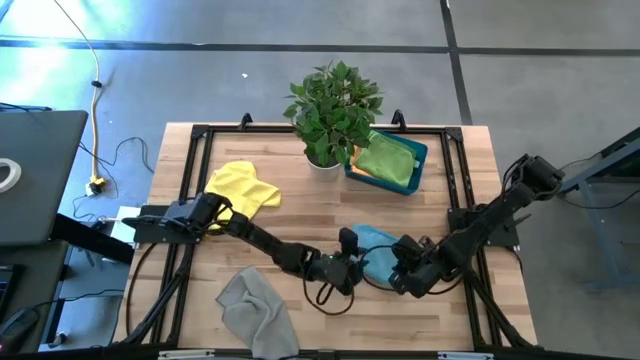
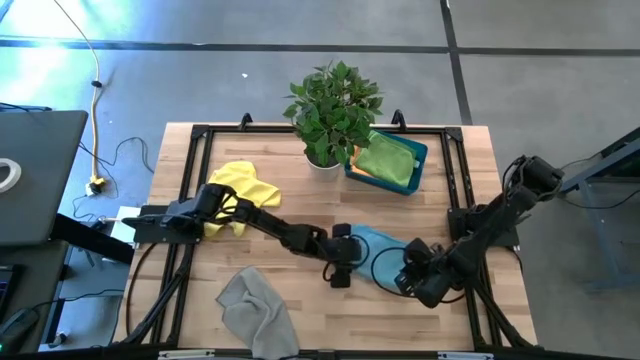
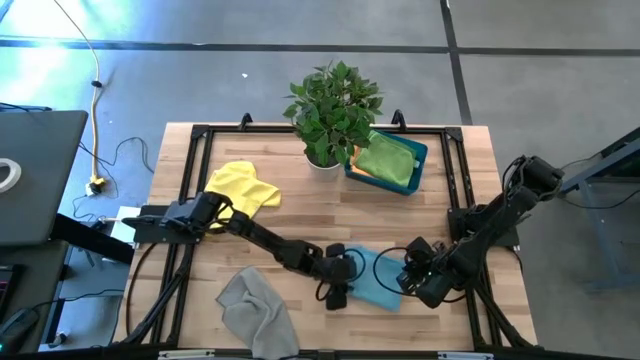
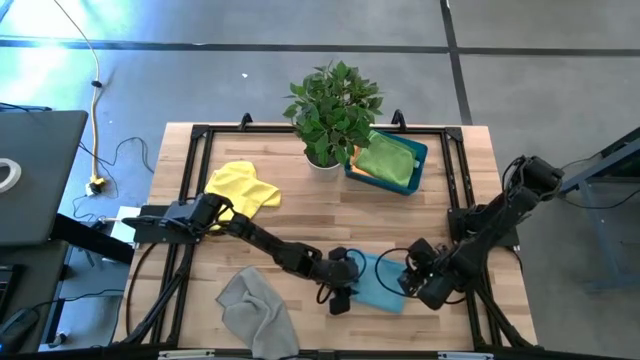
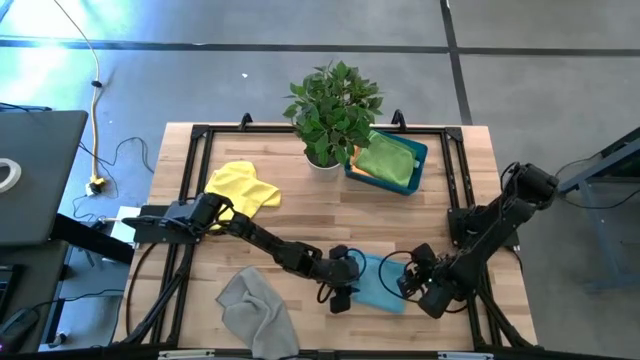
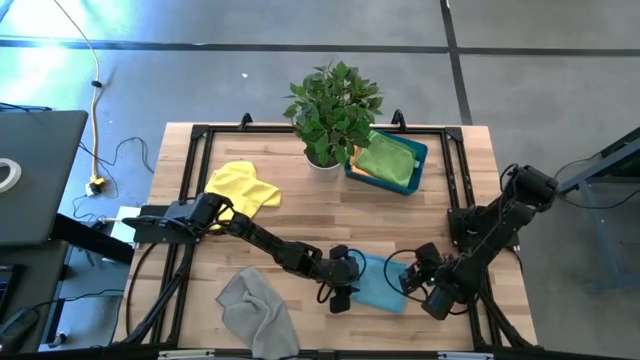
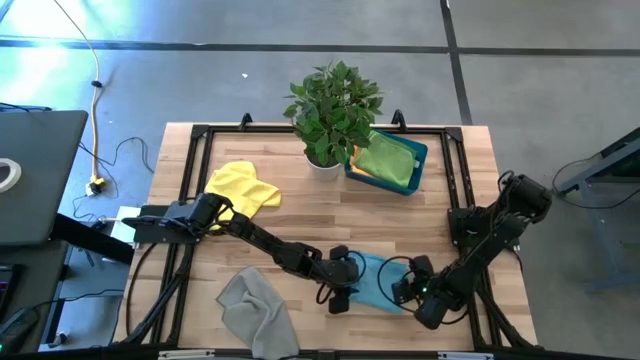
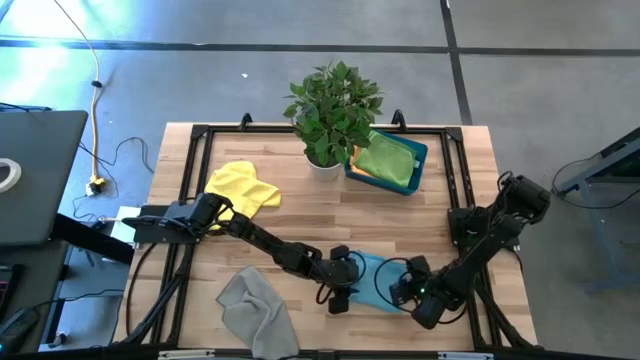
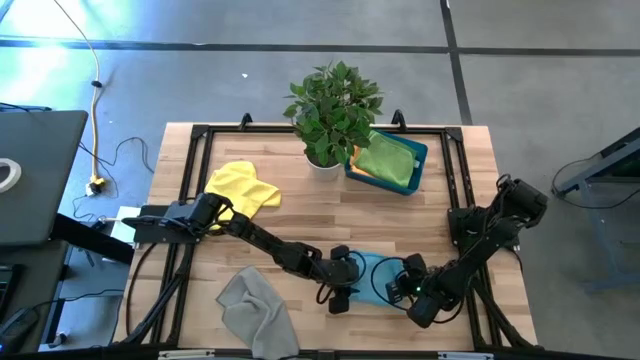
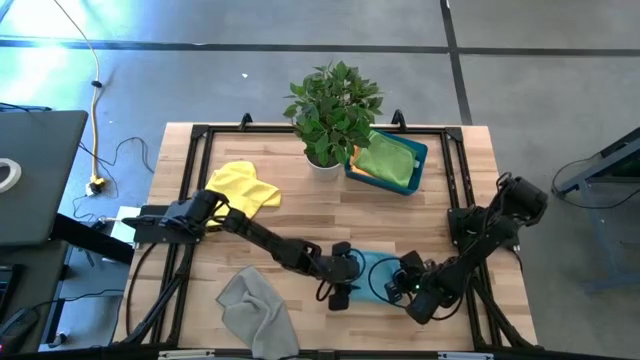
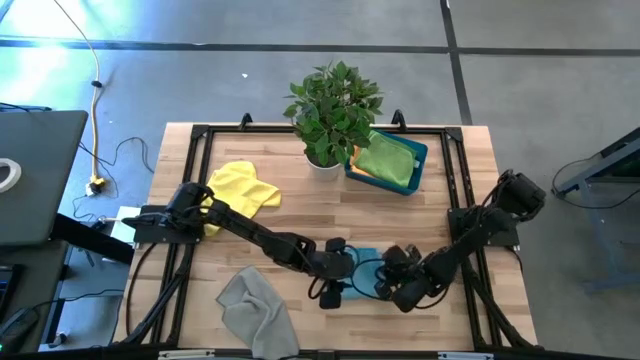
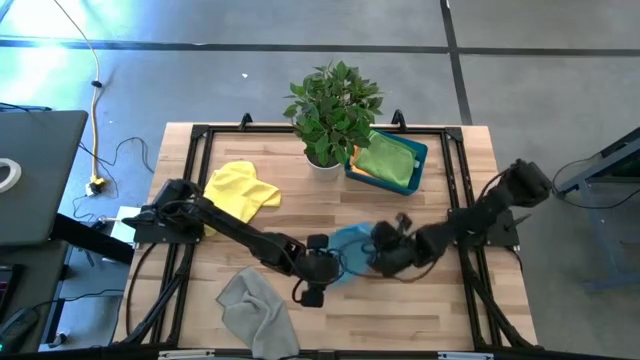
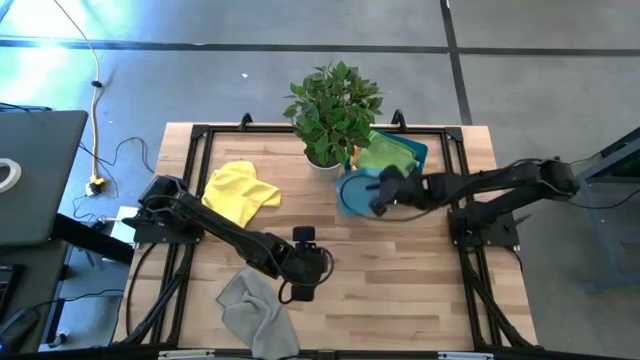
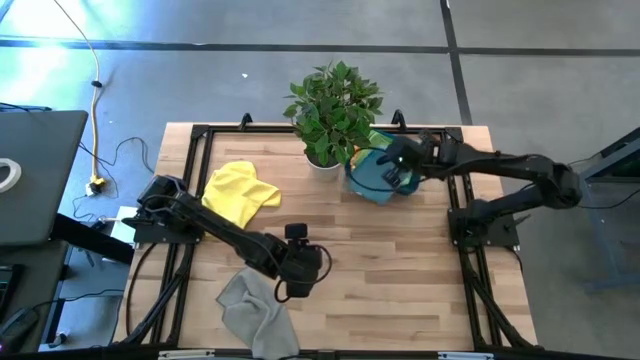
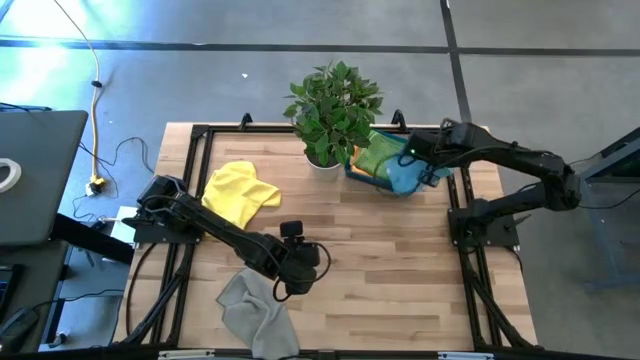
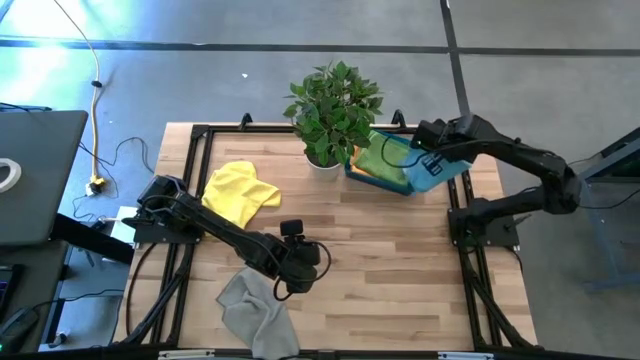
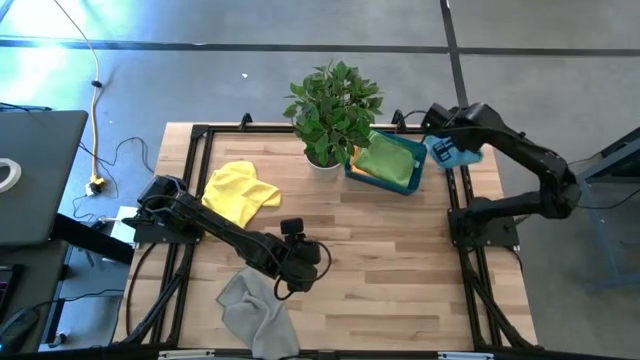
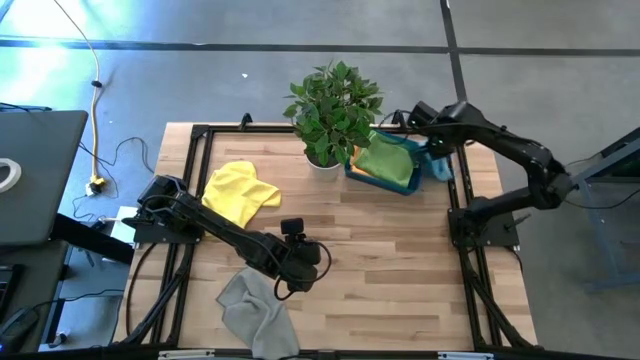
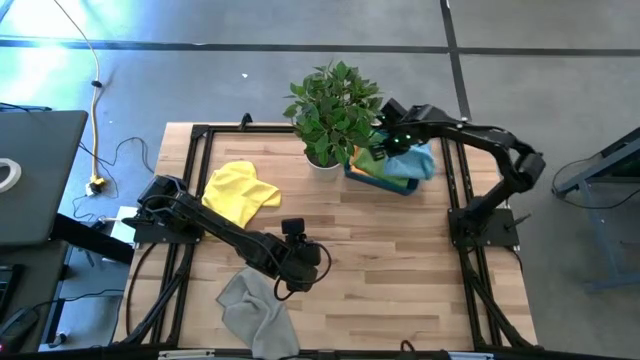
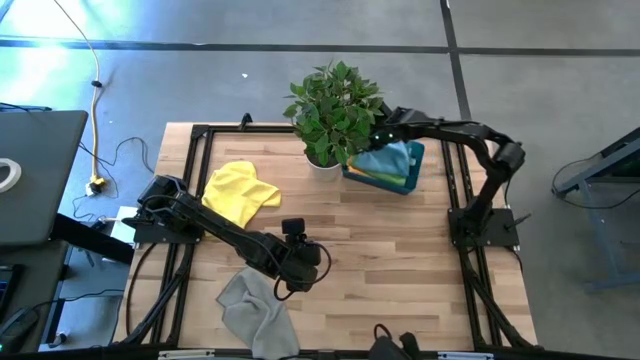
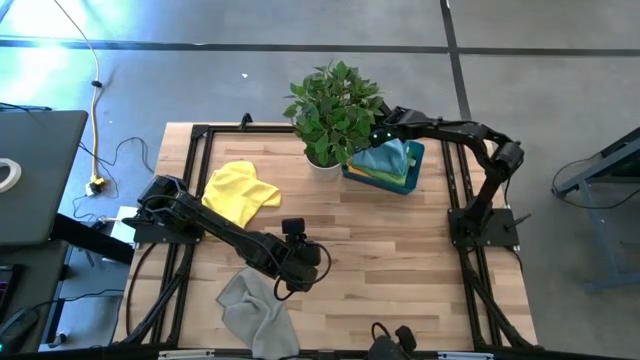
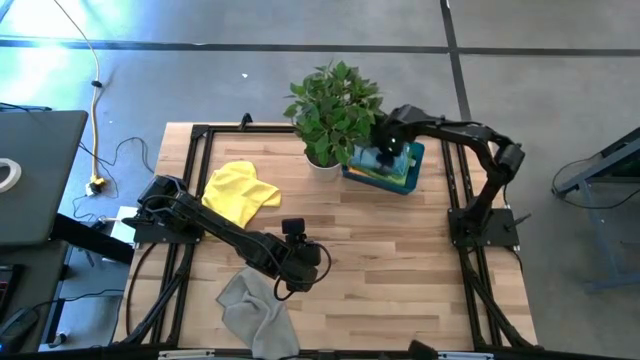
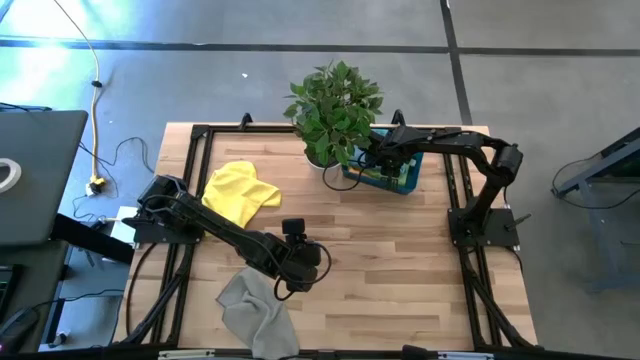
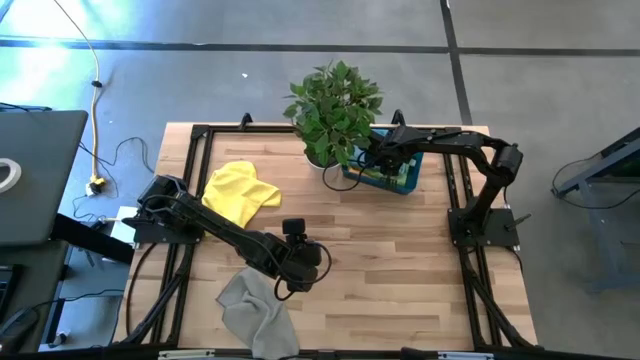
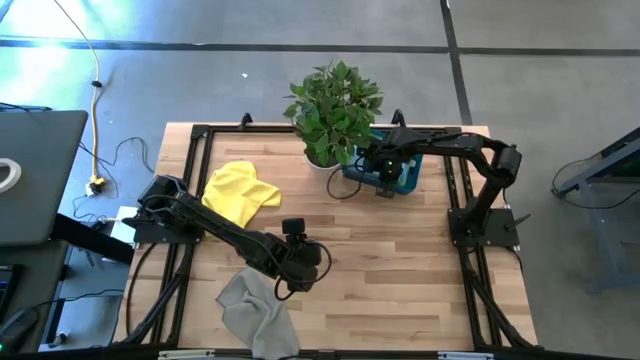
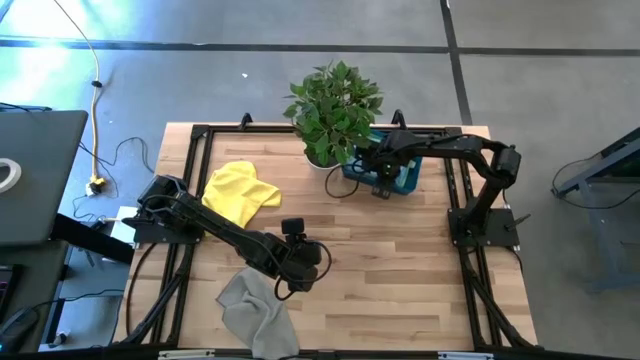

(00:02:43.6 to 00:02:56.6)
Task: Fold microfiber towels
Put the blue towel into the blue bin

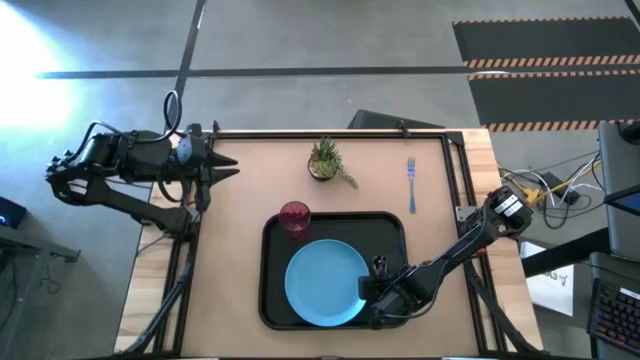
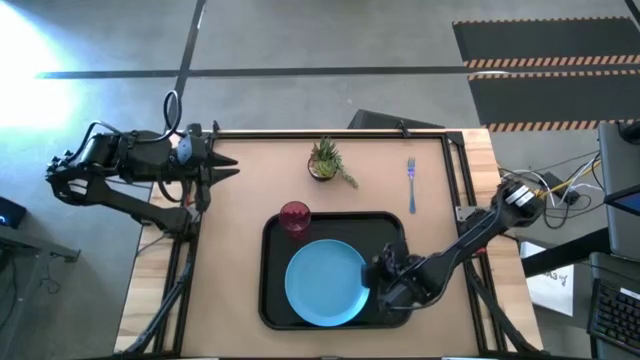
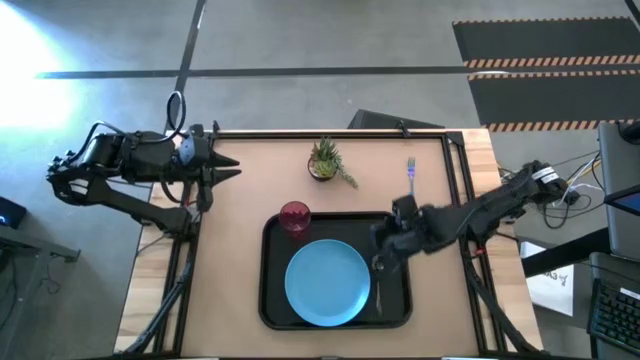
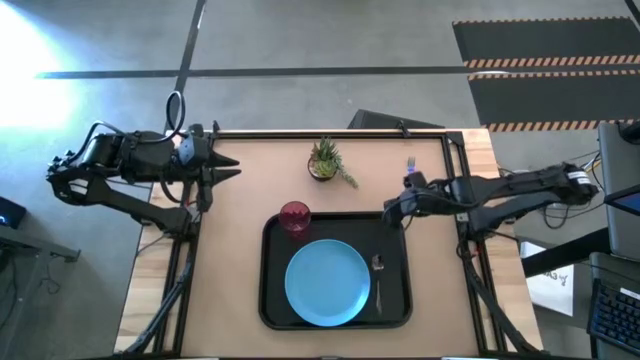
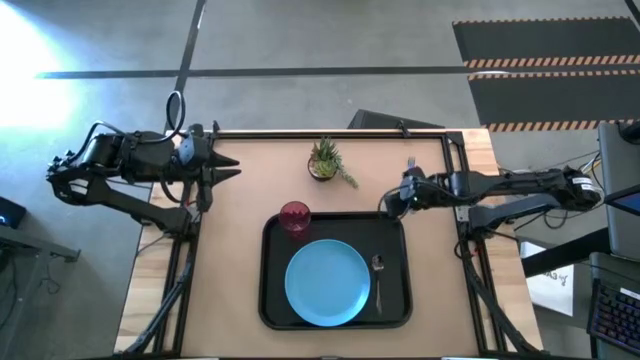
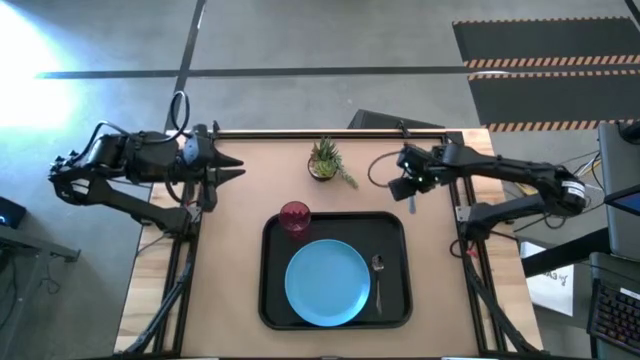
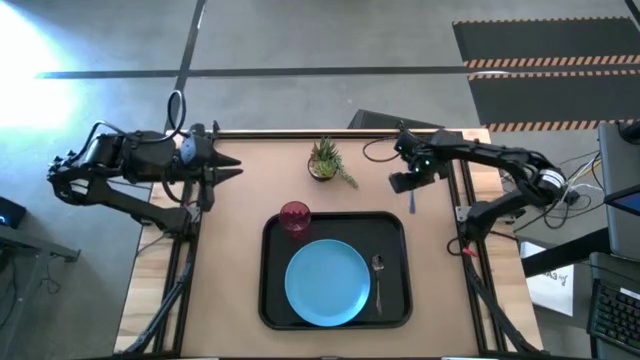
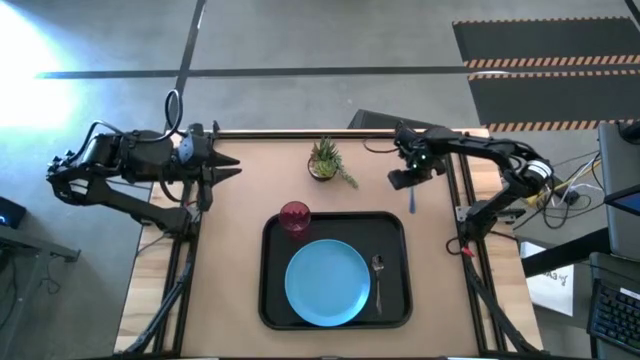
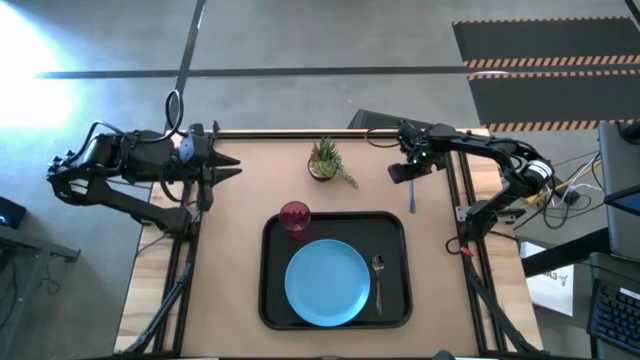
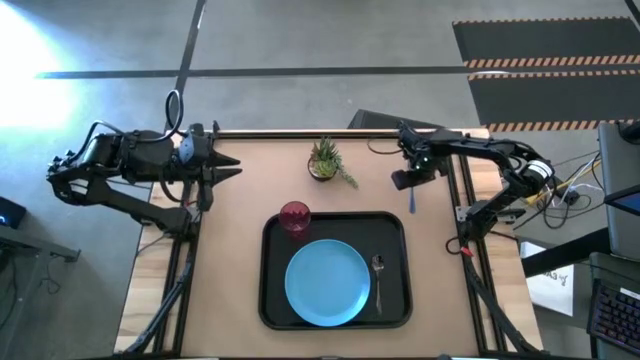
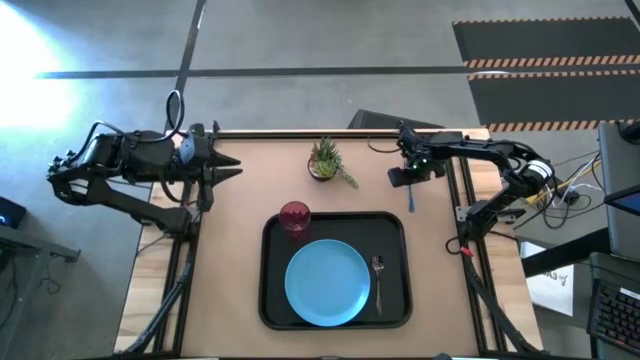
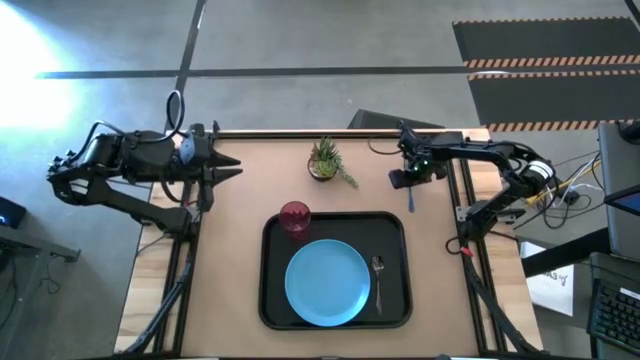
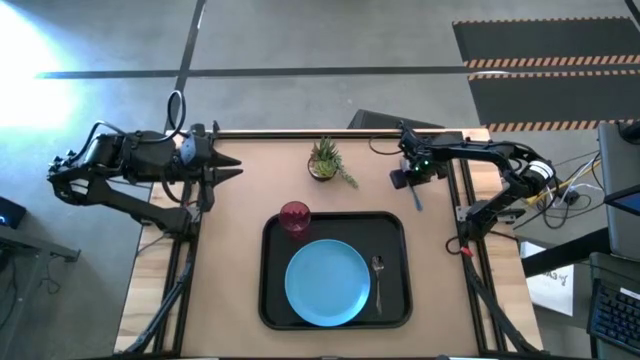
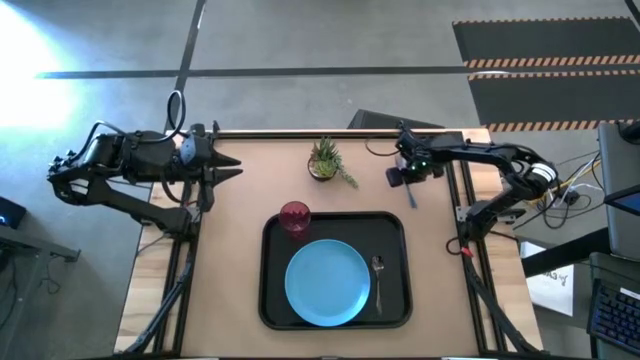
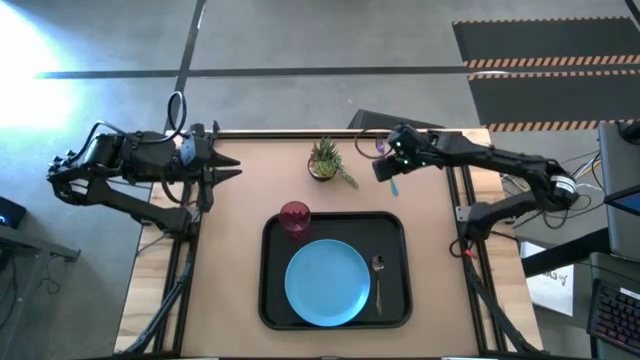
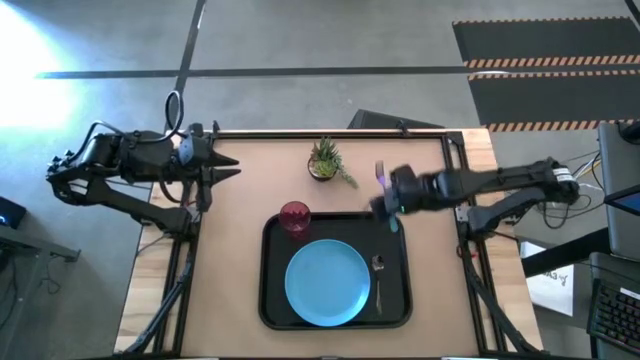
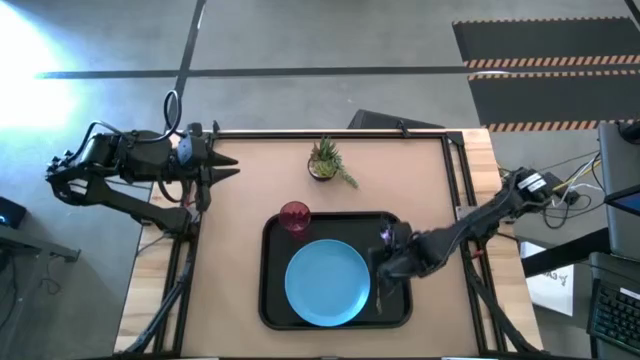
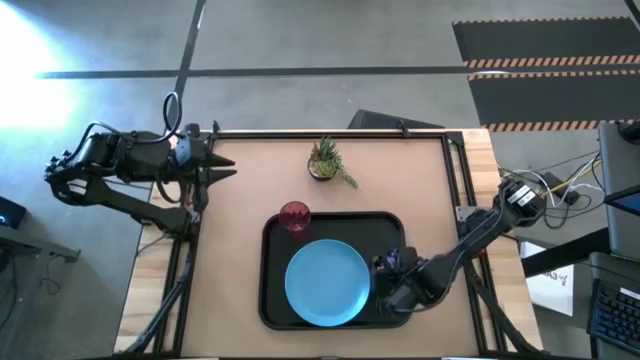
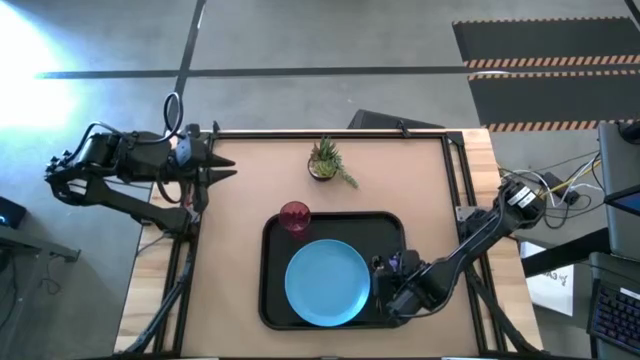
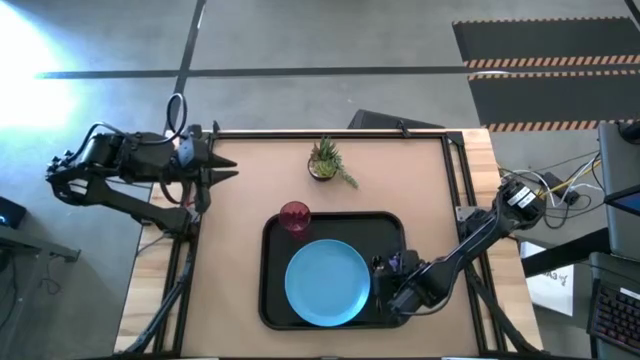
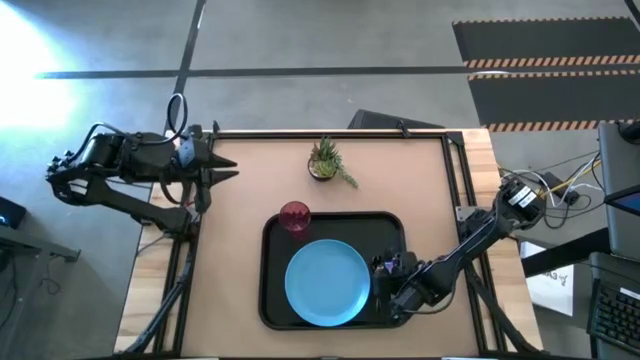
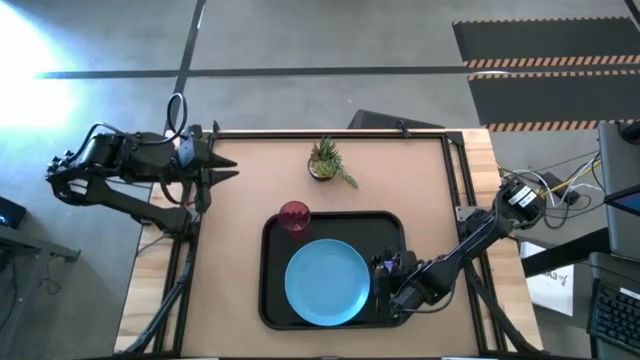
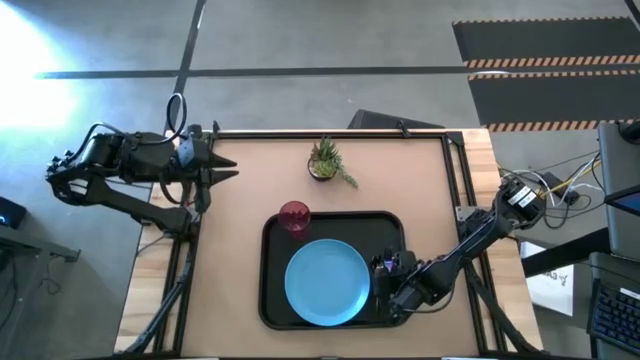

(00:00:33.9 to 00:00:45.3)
Task: Pick and place plate/cup/fork/spoon on tray
Put the blue fork to the right of the black spoon on the black serving tray
